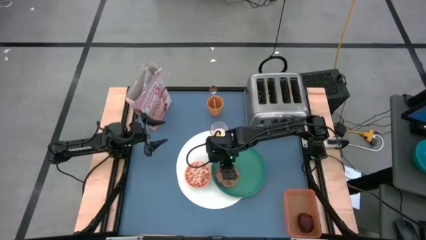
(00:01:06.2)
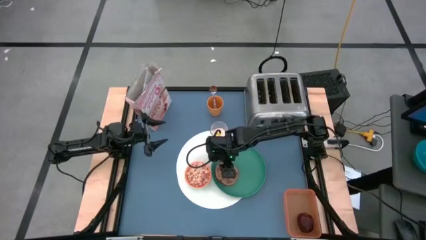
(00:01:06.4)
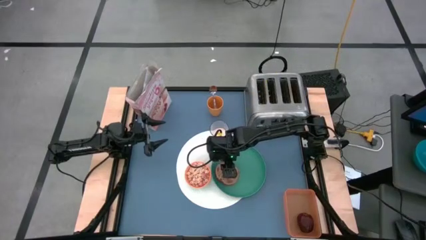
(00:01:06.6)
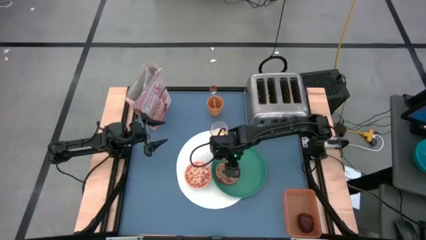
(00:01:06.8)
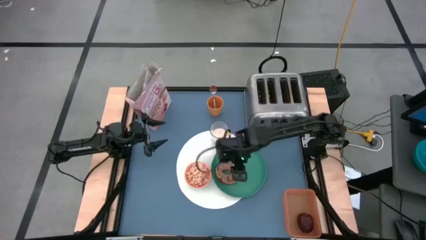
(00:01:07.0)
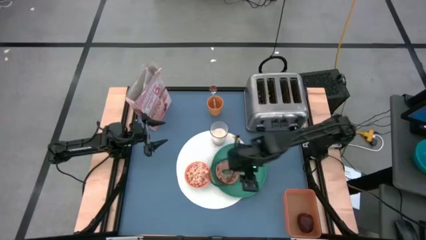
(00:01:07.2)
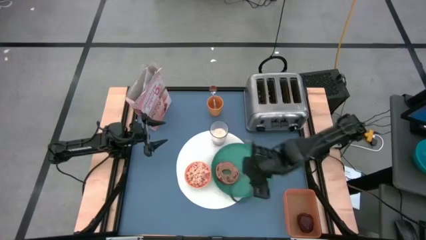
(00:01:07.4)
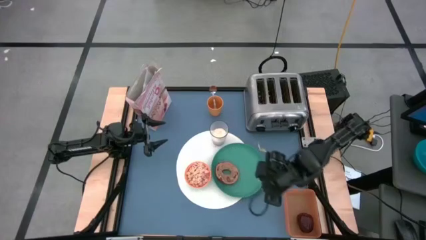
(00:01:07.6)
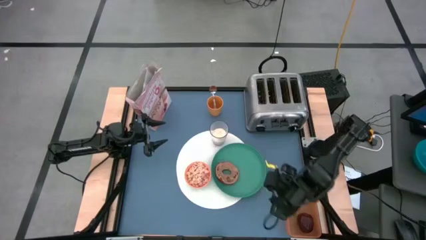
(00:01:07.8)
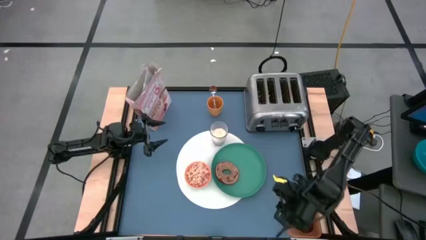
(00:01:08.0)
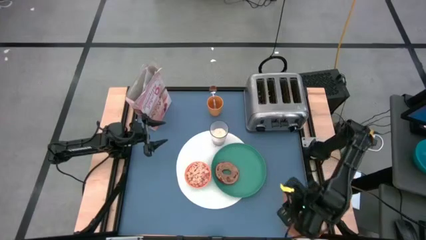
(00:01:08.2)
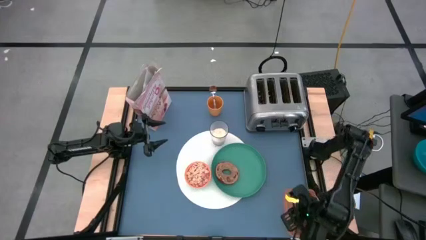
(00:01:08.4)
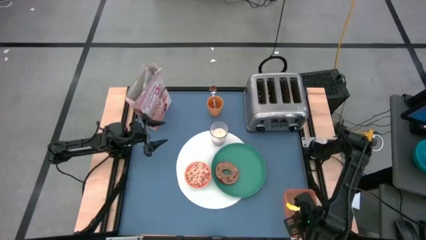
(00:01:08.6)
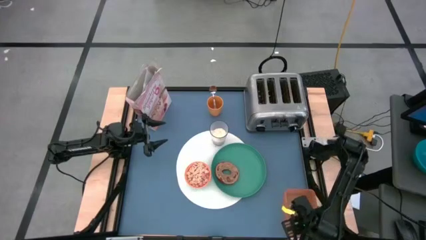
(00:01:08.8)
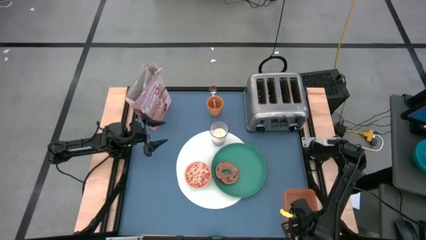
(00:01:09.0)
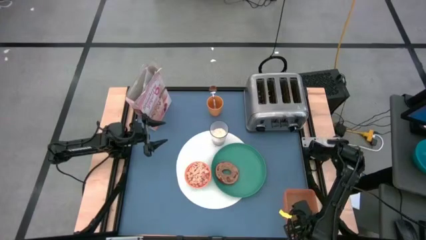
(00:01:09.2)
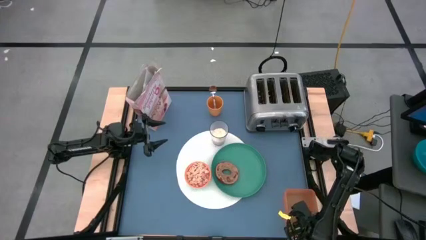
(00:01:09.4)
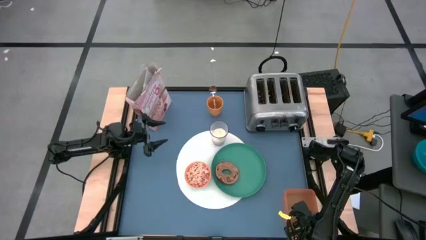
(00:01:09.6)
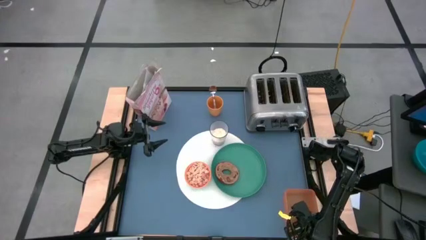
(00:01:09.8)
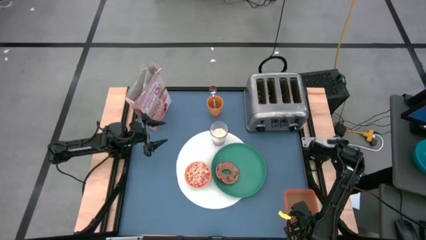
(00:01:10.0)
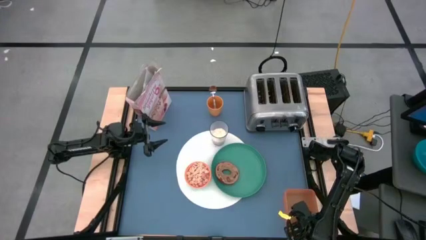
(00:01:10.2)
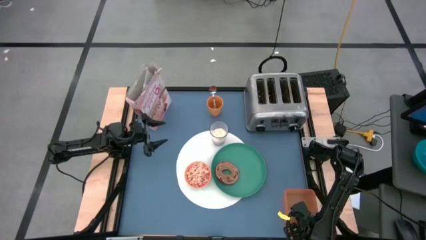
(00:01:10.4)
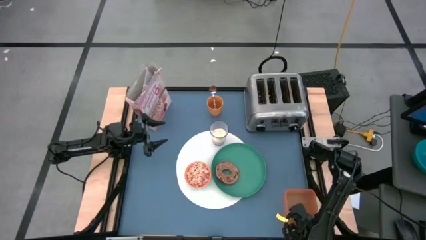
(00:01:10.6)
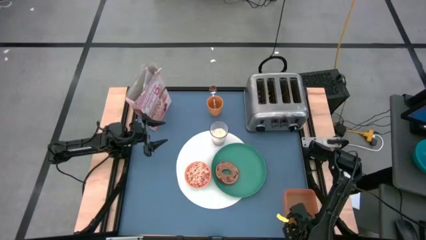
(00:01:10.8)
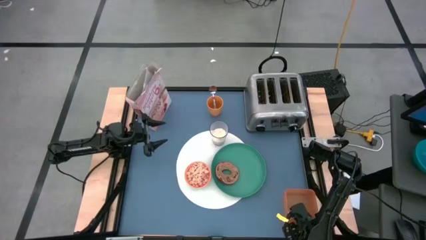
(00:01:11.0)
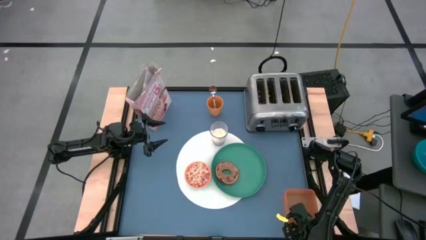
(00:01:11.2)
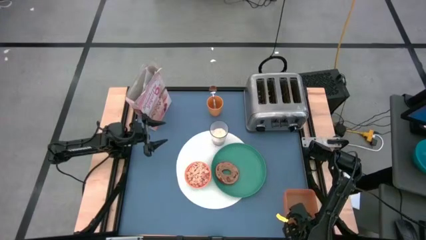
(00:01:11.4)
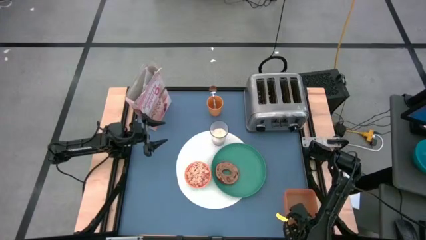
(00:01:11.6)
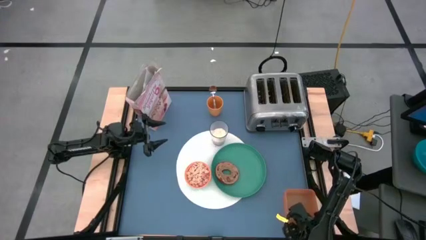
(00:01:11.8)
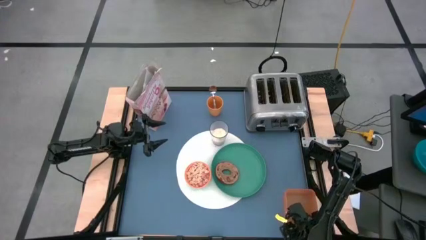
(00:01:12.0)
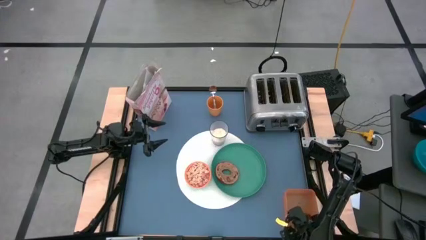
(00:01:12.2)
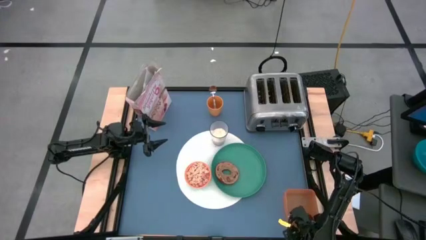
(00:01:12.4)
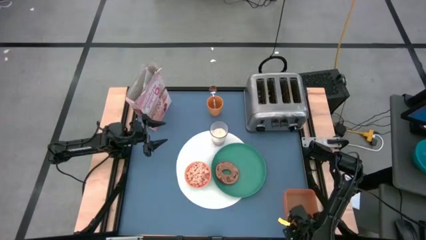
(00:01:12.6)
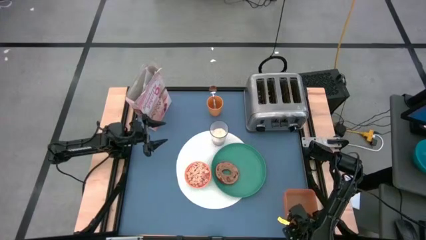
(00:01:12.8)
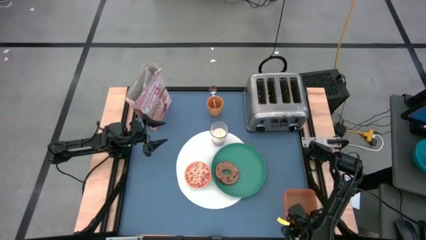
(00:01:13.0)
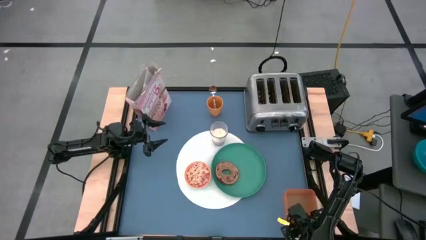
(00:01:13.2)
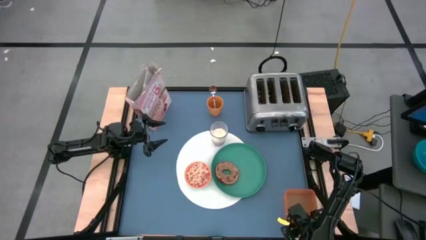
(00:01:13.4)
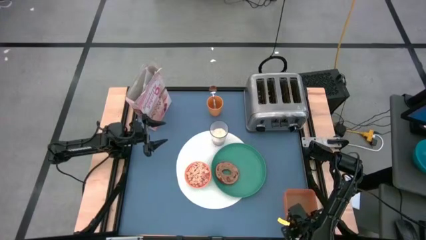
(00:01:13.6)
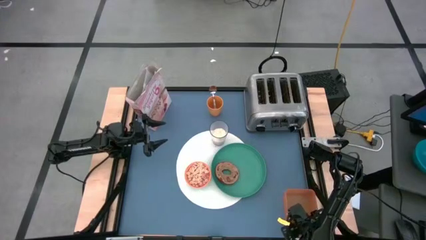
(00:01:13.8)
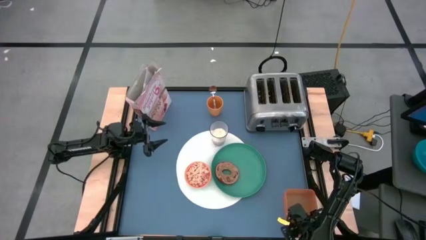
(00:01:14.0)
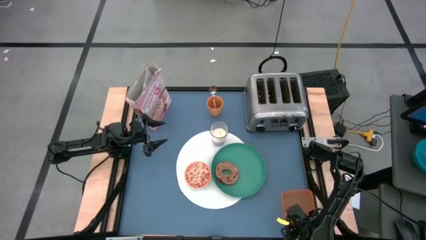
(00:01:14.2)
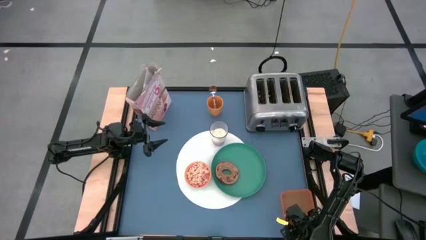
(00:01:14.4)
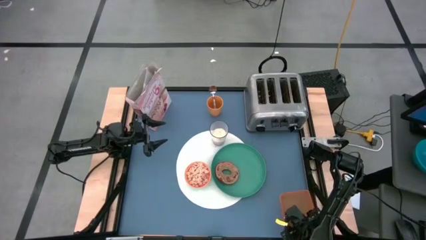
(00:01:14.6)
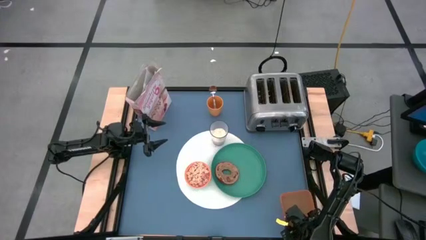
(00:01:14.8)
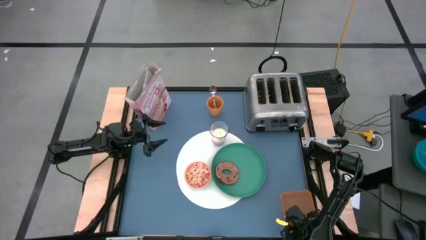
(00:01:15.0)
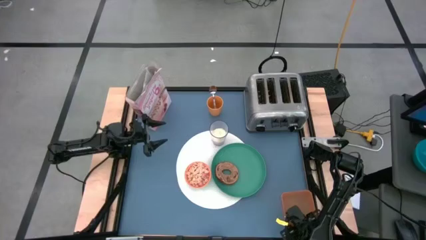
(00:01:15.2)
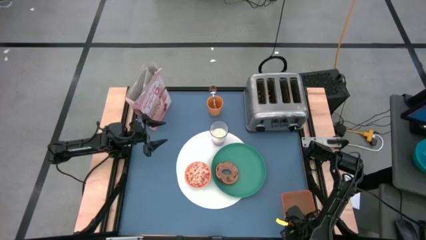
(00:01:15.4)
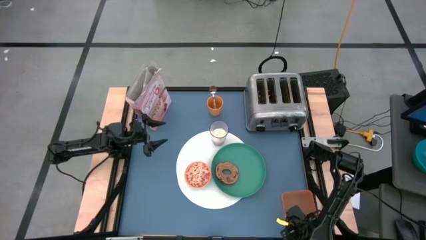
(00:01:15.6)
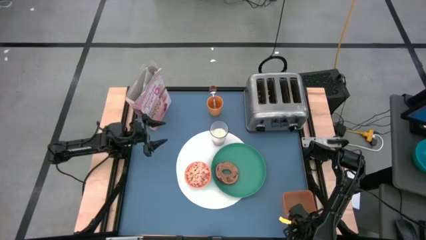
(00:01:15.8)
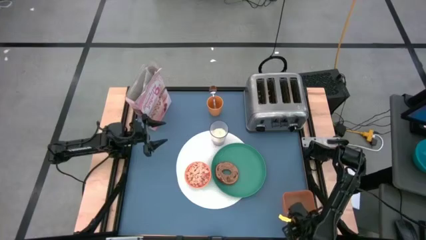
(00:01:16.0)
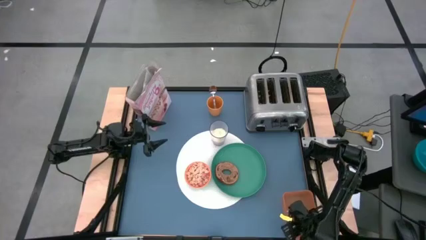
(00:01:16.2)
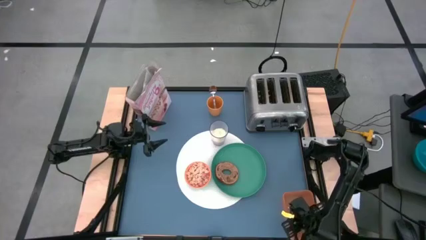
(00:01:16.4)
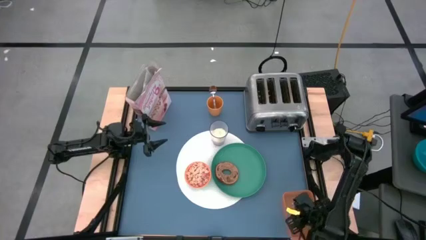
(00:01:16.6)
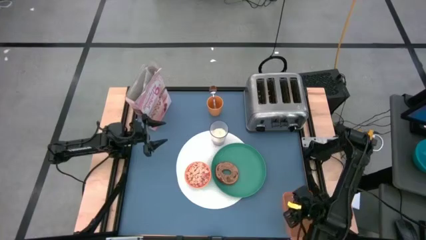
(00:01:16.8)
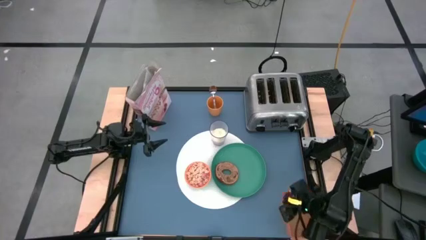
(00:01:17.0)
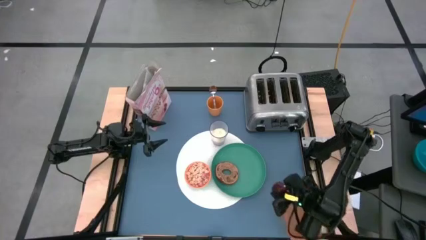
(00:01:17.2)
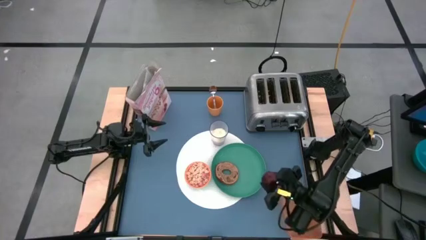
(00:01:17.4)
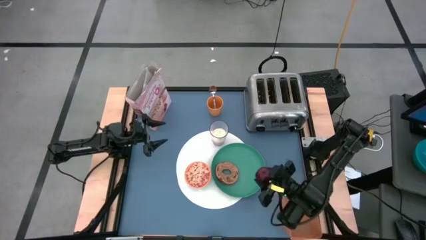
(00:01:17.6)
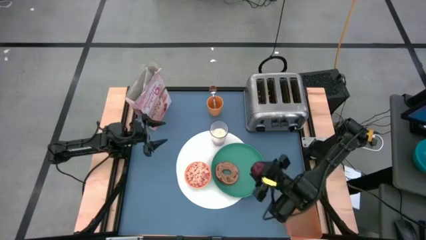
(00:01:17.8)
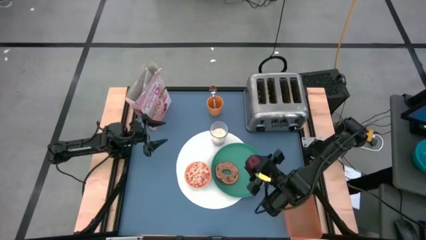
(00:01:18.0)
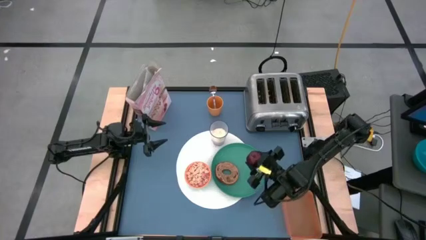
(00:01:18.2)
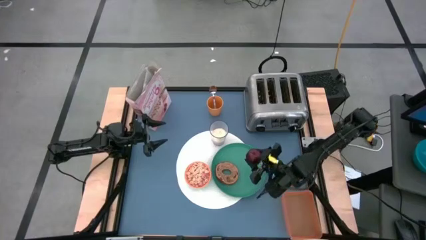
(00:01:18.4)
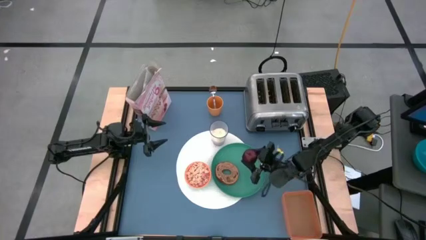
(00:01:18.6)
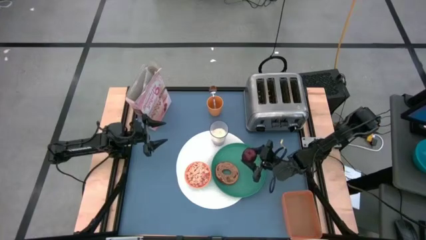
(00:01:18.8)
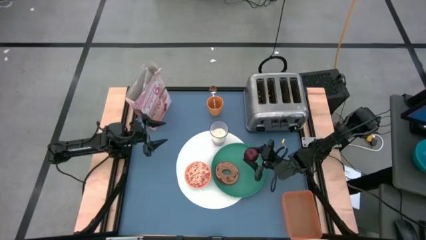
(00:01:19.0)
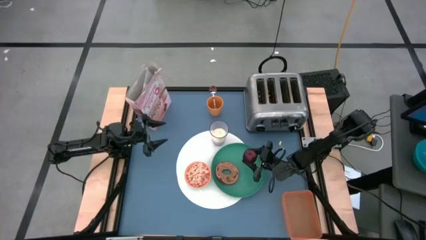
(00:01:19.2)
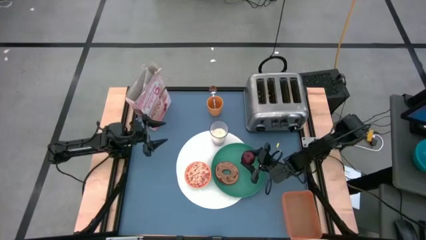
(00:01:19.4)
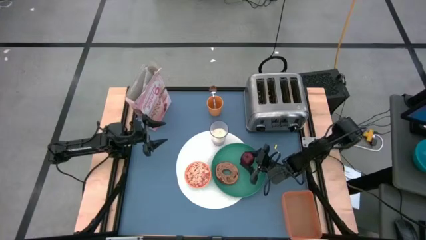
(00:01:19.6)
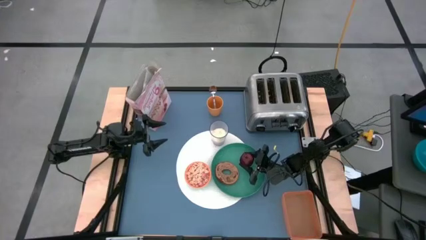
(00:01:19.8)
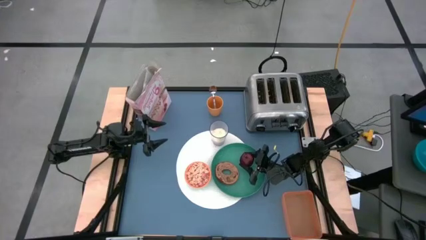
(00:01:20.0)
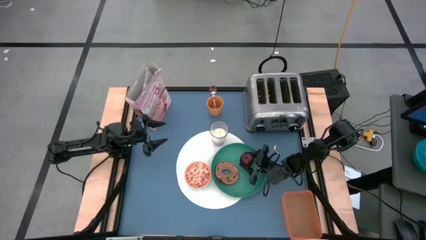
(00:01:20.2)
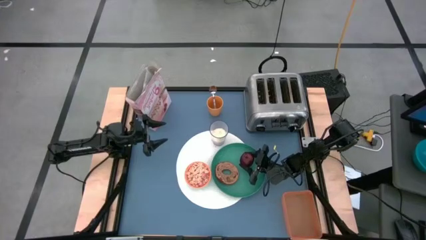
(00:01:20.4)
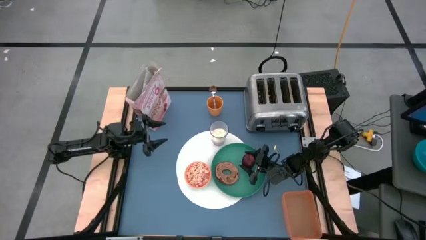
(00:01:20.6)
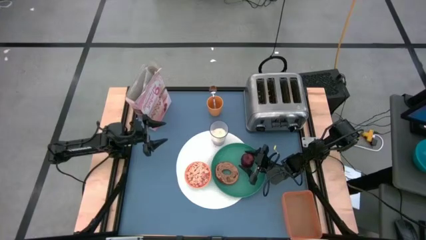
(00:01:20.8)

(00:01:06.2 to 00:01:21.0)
Task: Arrange a breakfast setting
Put the red apple on the green plate beside the toasted bagel
